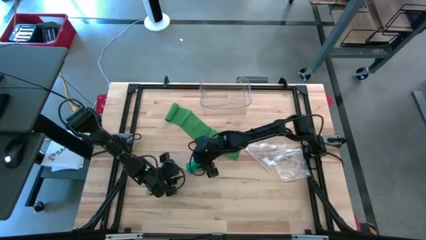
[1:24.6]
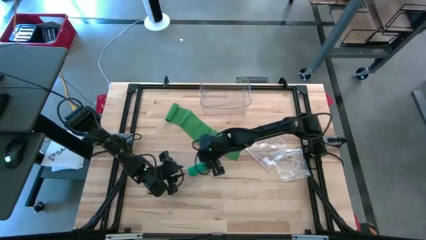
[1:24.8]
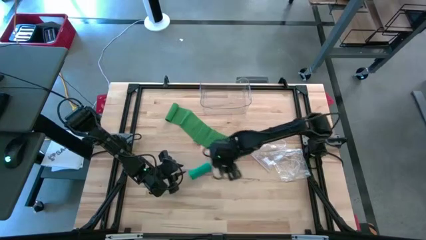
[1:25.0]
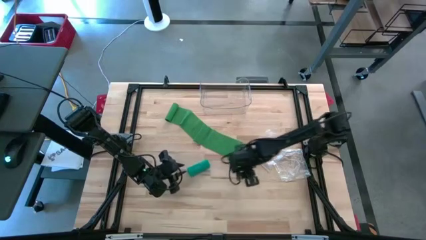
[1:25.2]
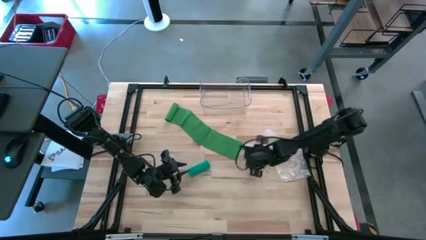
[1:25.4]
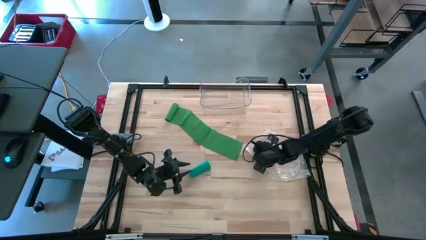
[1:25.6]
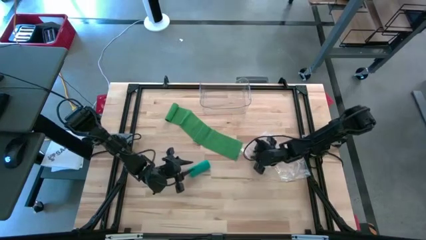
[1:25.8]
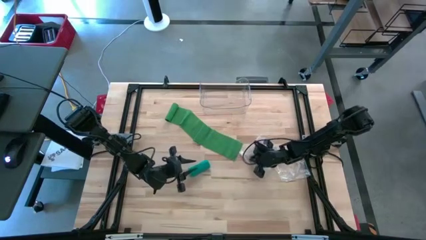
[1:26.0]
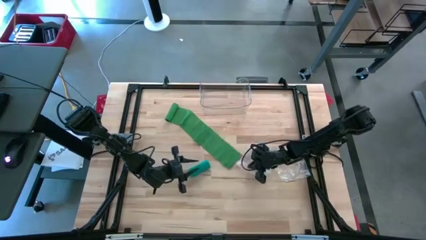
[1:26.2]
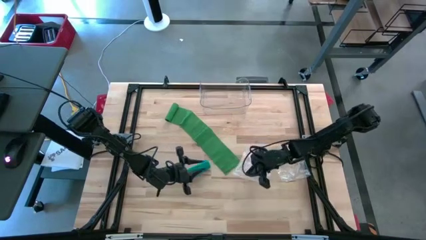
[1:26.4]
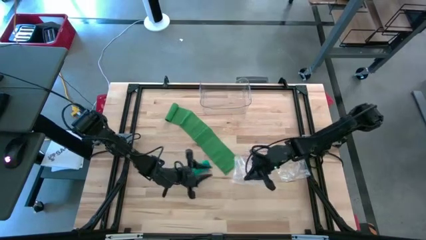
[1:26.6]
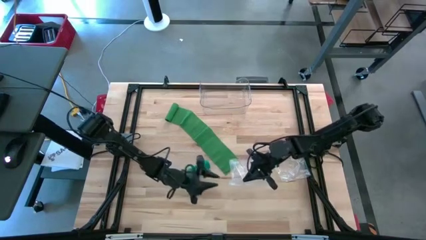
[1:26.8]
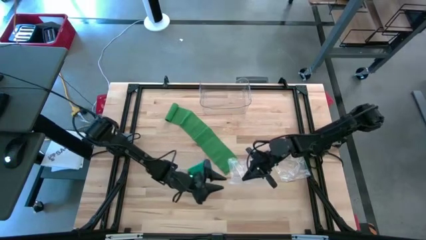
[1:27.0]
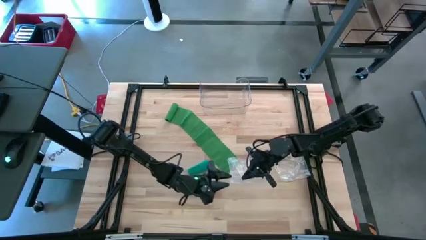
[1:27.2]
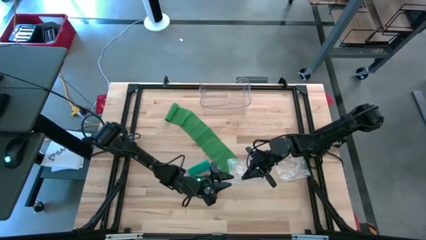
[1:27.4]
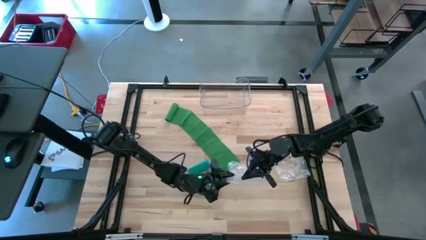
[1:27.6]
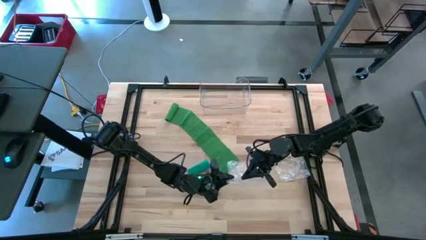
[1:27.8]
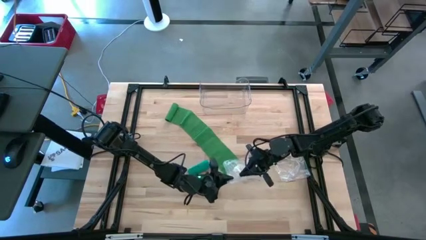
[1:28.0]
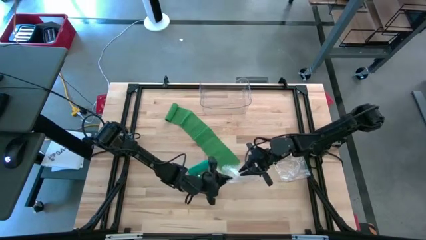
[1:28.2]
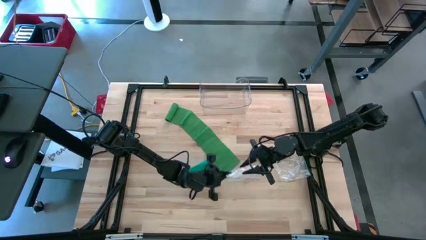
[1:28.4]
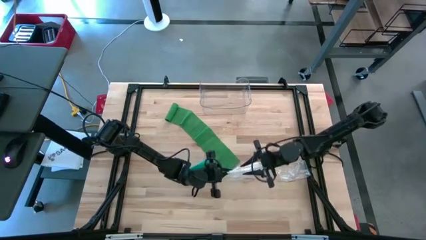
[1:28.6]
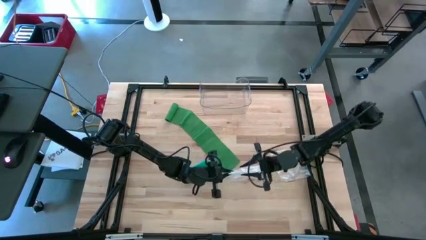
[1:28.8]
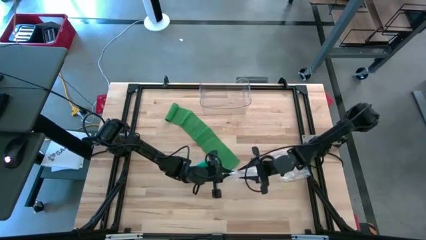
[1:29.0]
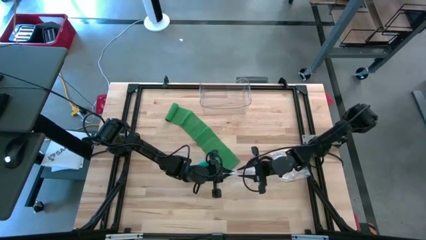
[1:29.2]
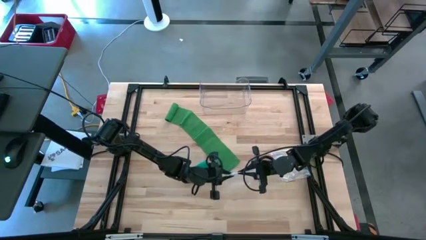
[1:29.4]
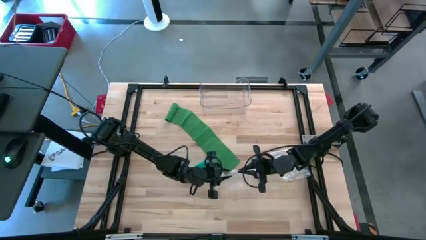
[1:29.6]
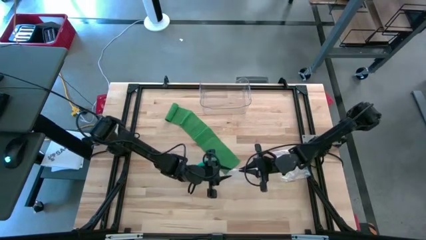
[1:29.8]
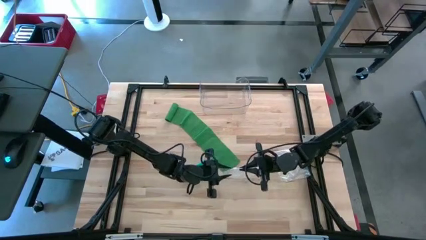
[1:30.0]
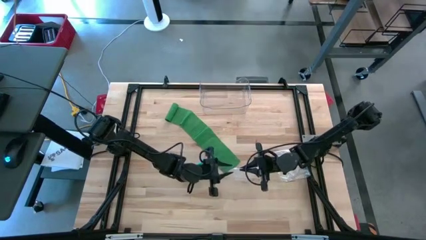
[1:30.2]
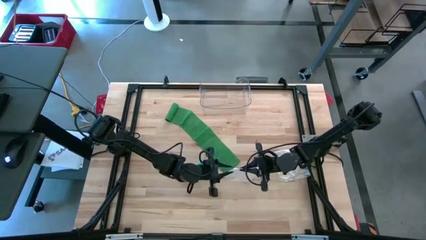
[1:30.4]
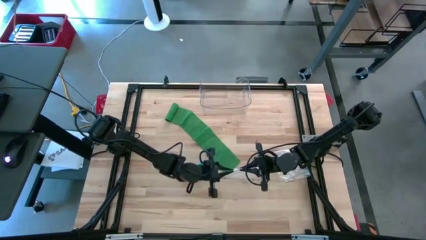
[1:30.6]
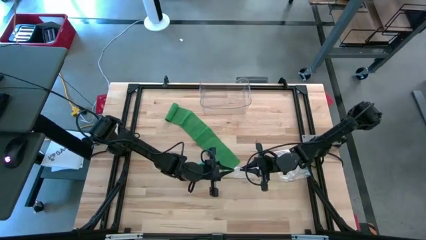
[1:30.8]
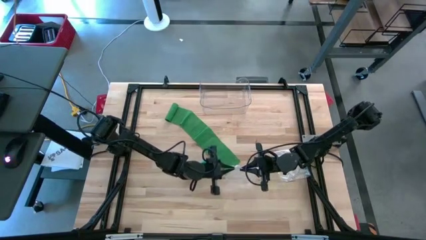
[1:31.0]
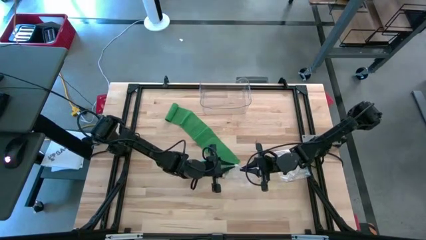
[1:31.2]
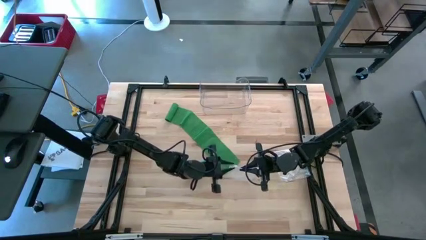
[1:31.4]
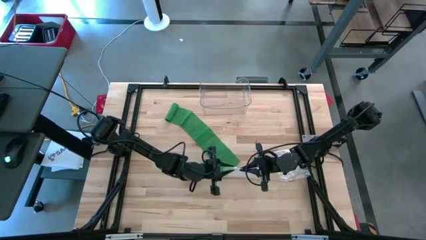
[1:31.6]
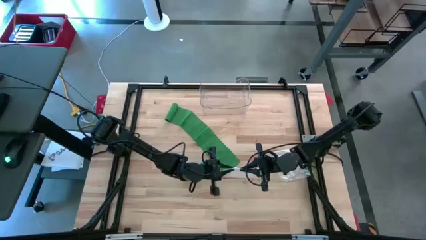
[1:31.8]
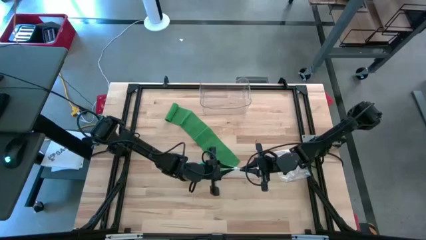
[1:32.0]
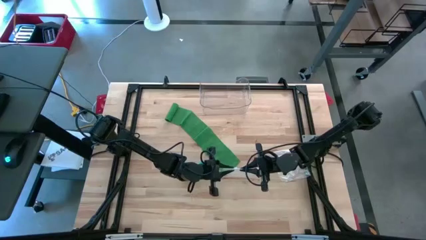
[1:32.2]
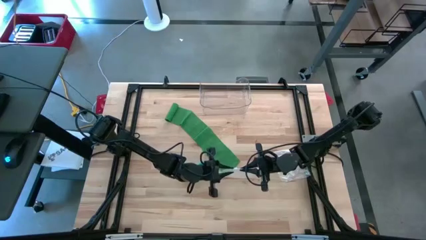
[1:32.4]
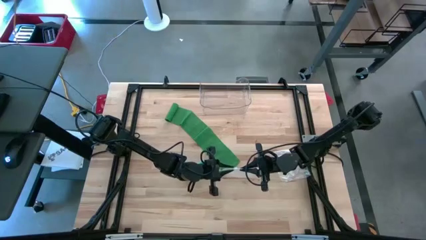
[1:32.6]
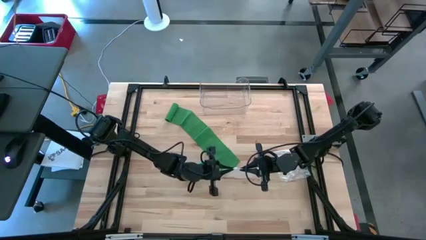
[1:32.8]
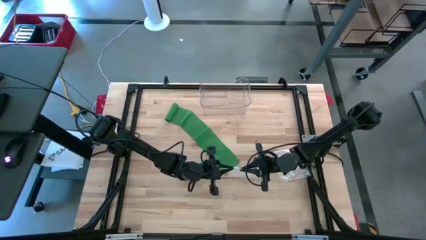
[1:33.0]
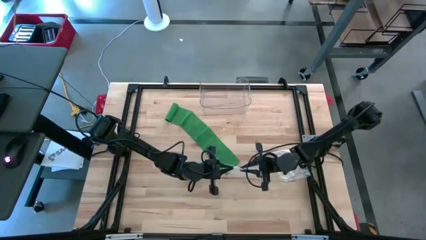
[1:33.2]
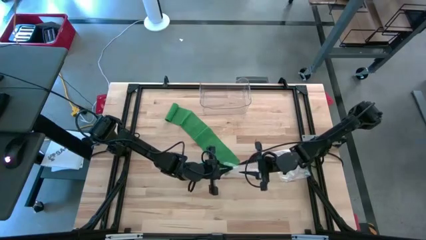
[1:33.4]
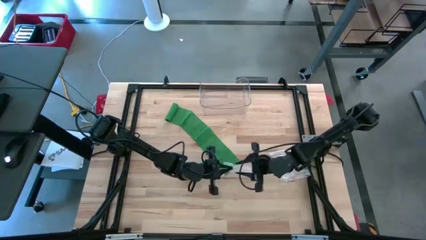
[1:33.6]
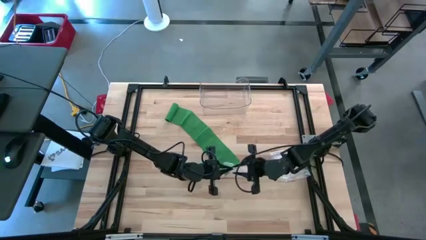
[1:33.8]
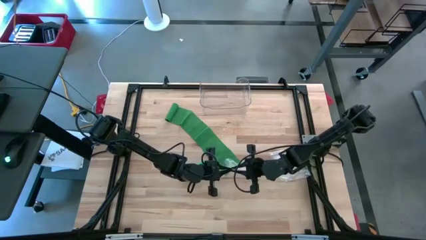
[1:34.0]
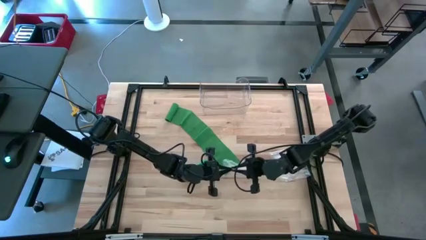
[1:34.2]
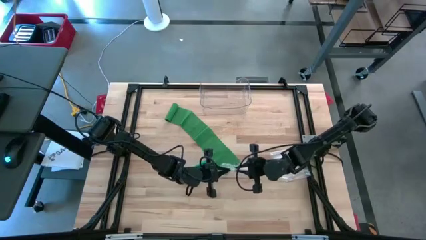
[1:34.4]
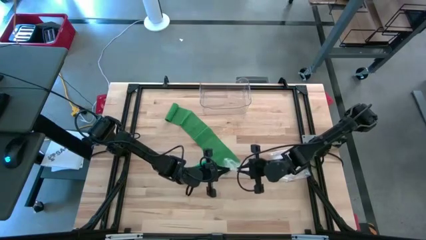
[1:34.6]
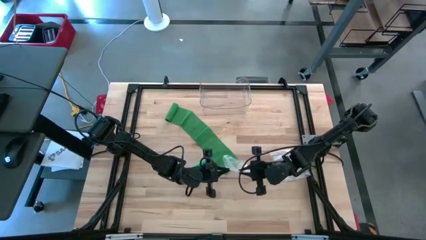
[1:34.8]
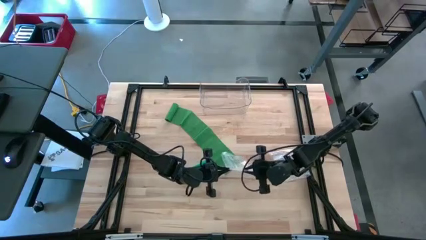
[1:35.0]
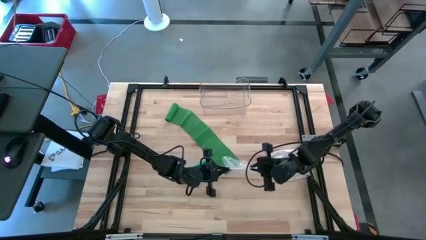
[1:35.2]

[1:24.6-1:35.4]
Task: Roll bandage
Open the left zip bag
